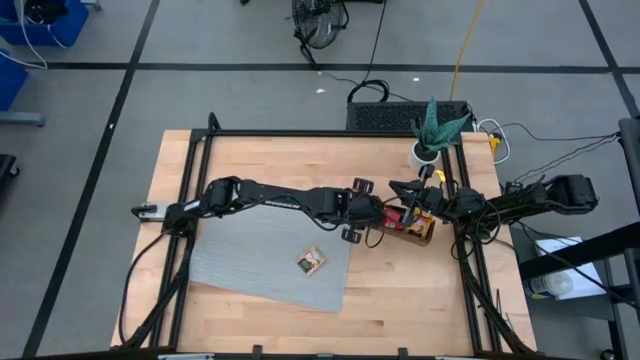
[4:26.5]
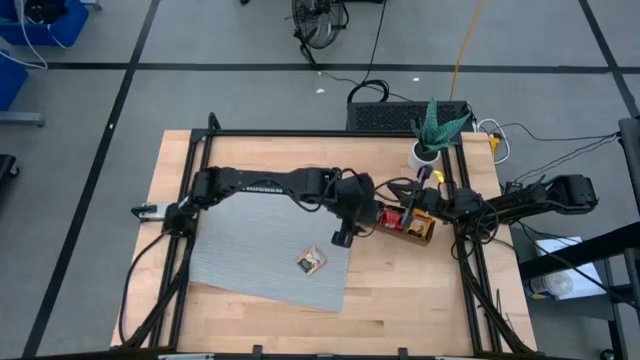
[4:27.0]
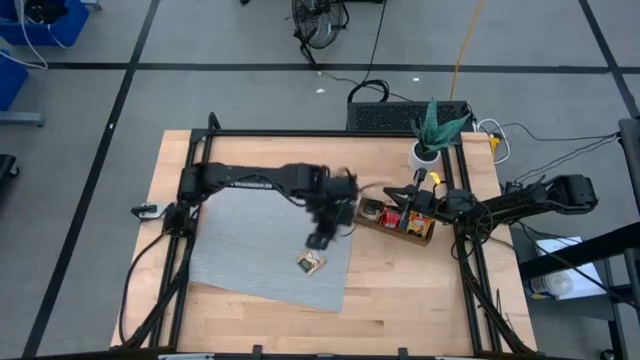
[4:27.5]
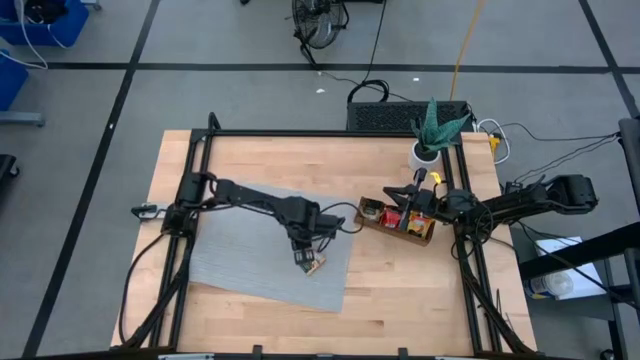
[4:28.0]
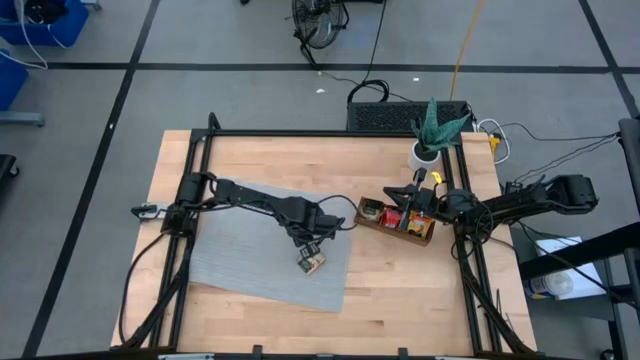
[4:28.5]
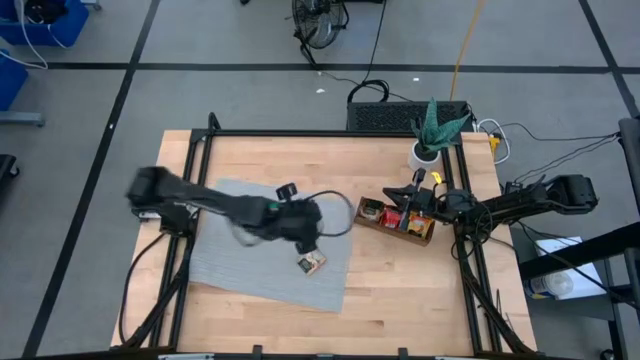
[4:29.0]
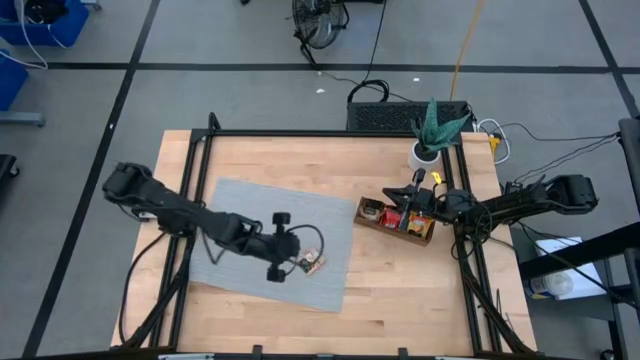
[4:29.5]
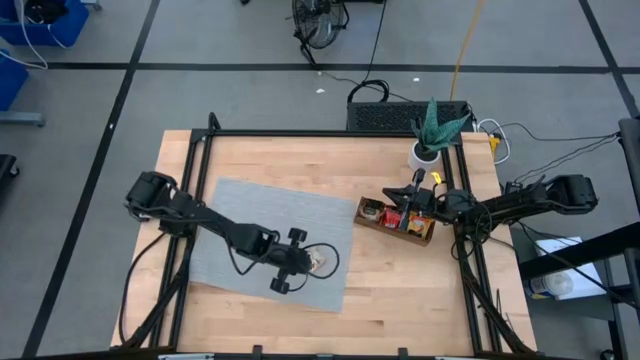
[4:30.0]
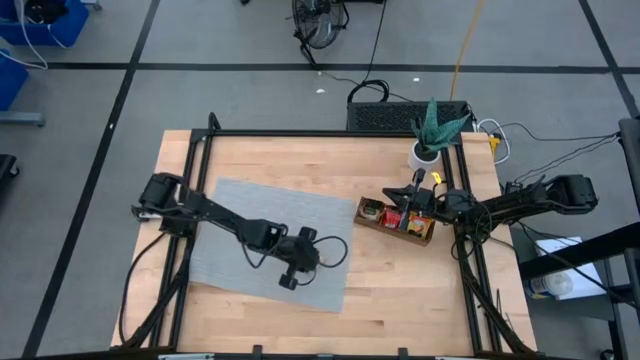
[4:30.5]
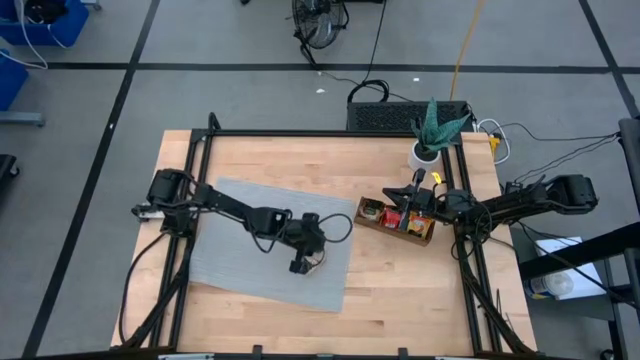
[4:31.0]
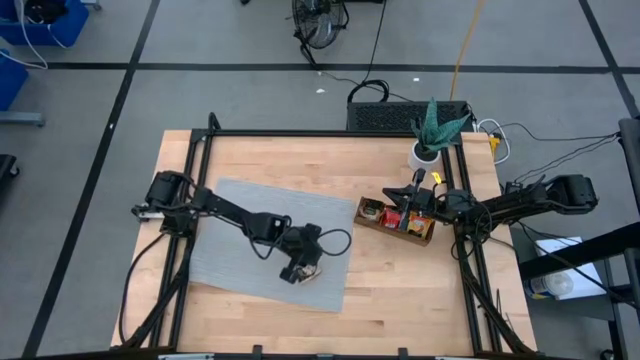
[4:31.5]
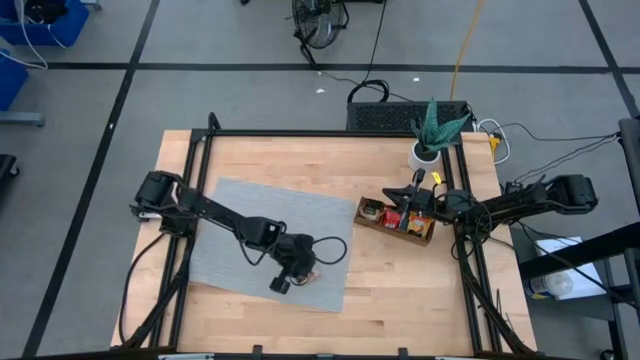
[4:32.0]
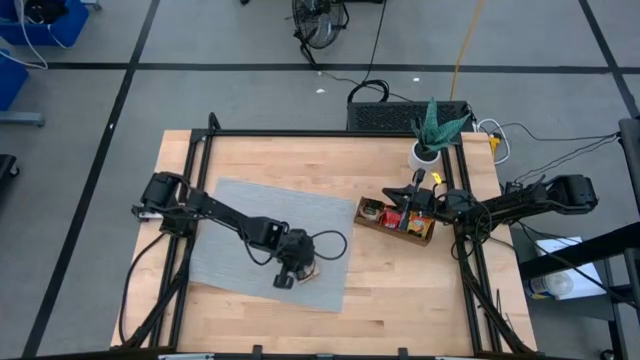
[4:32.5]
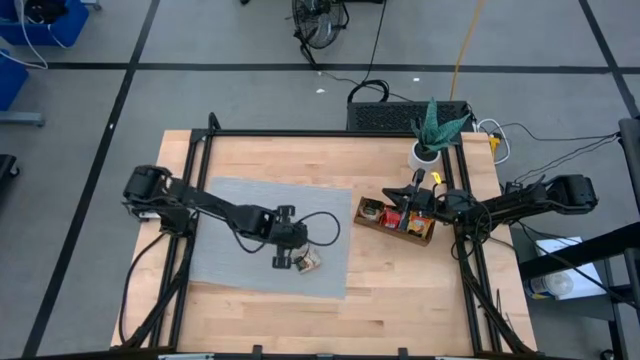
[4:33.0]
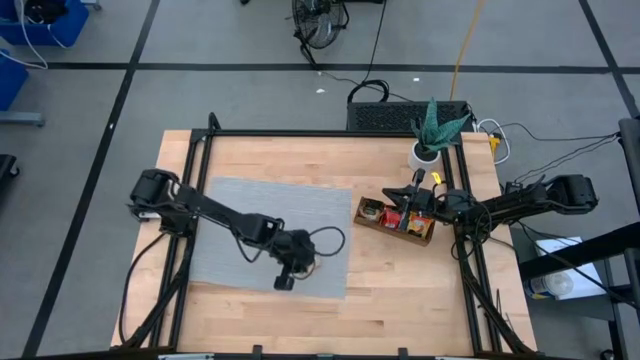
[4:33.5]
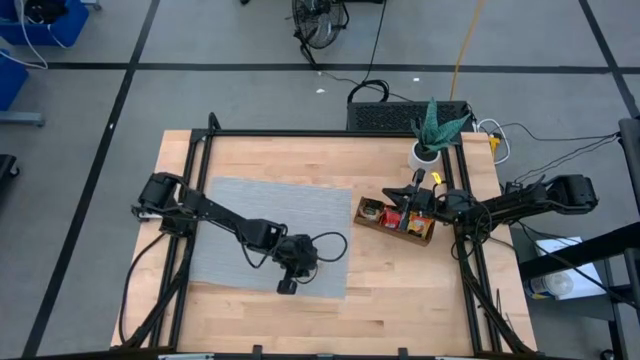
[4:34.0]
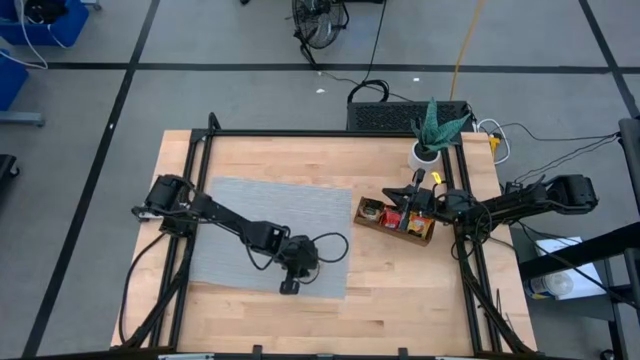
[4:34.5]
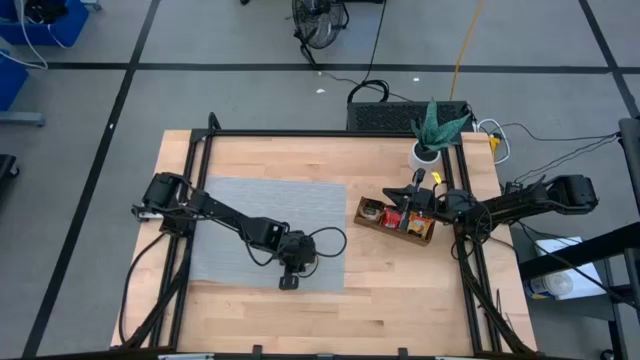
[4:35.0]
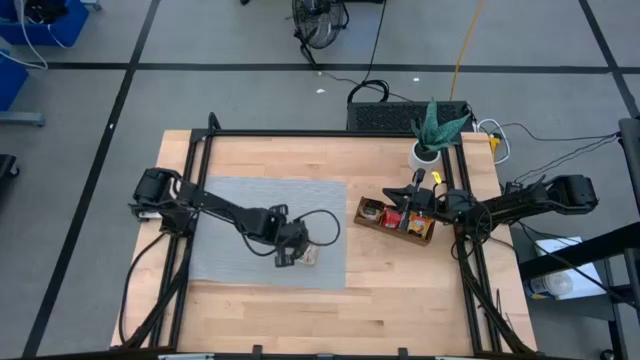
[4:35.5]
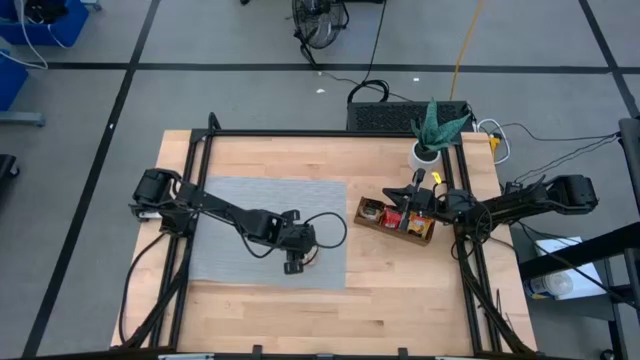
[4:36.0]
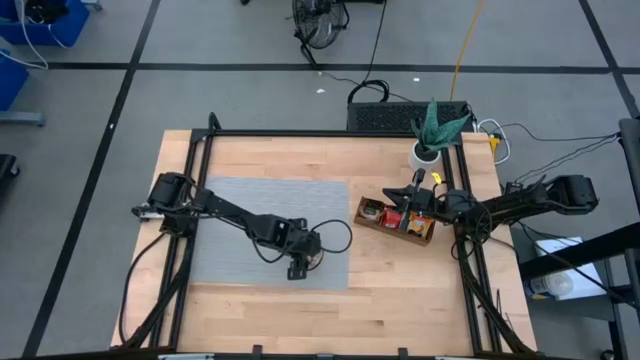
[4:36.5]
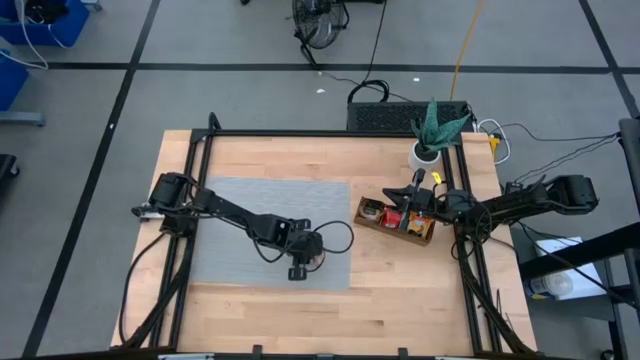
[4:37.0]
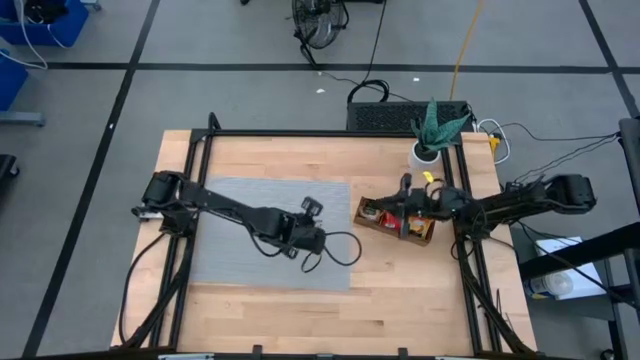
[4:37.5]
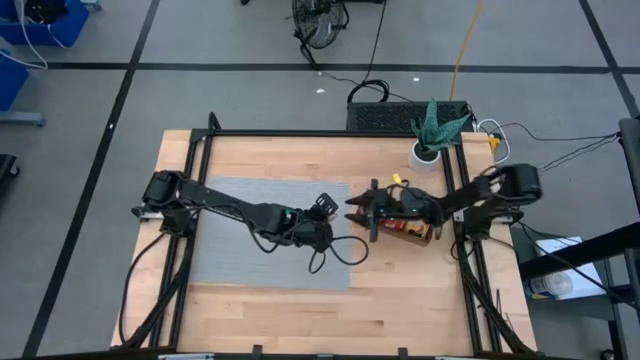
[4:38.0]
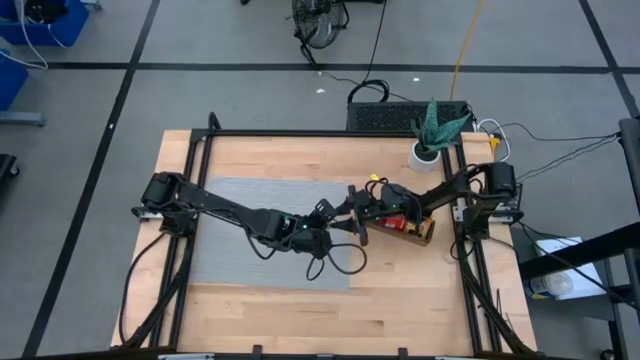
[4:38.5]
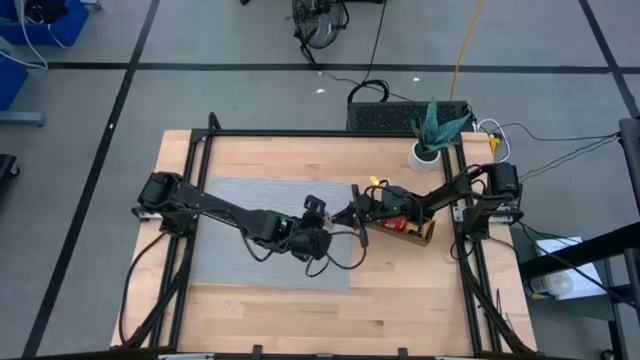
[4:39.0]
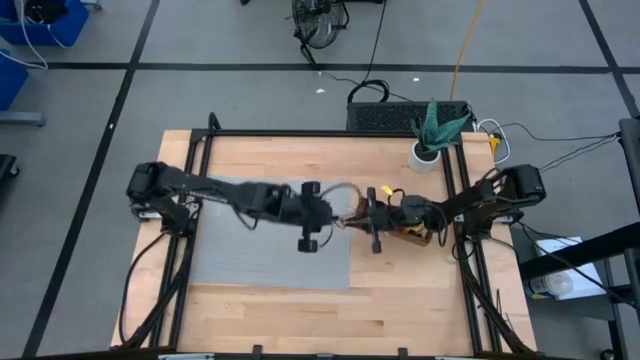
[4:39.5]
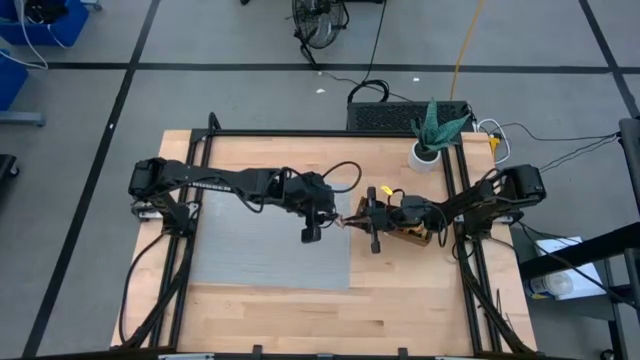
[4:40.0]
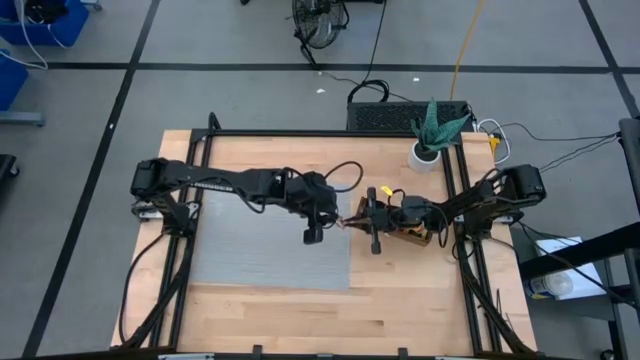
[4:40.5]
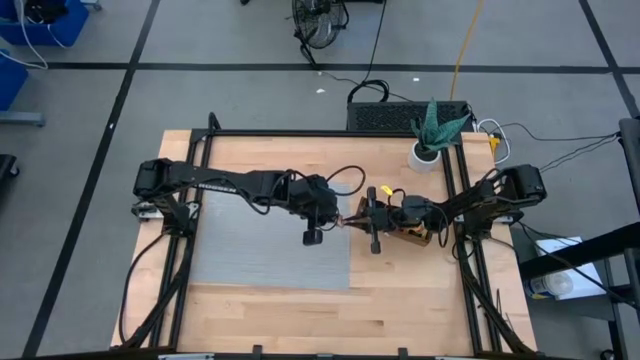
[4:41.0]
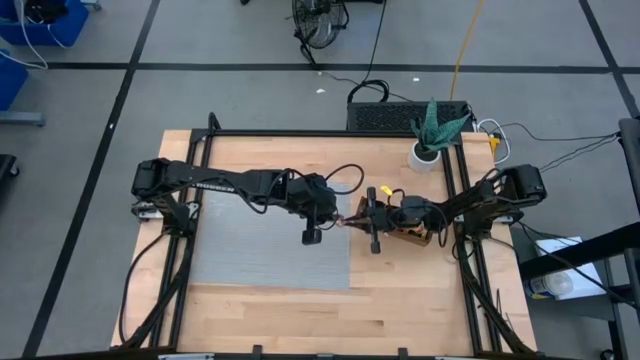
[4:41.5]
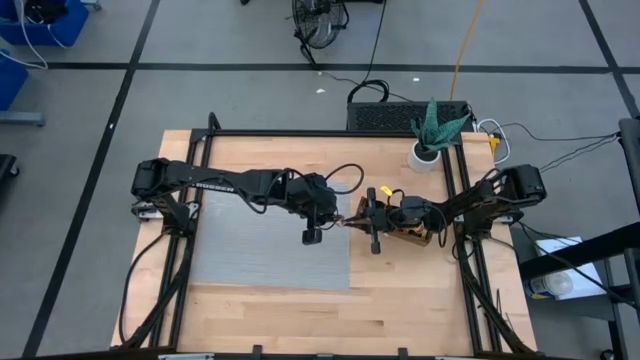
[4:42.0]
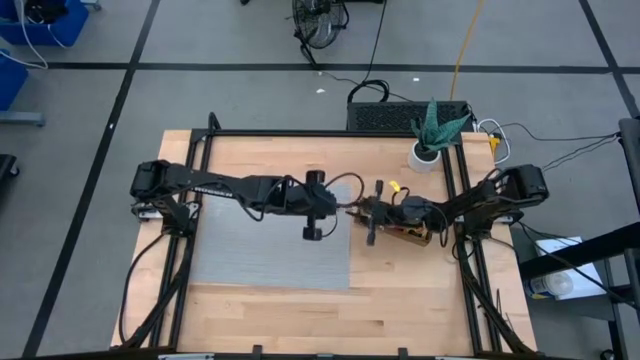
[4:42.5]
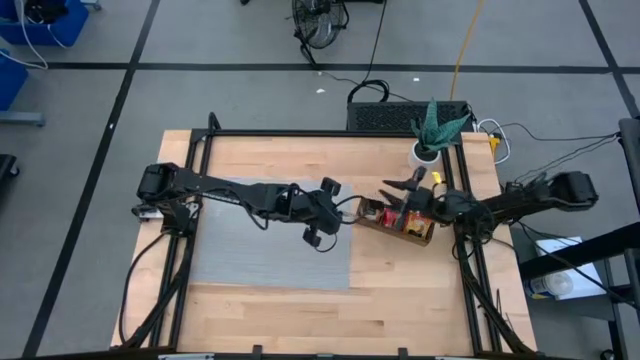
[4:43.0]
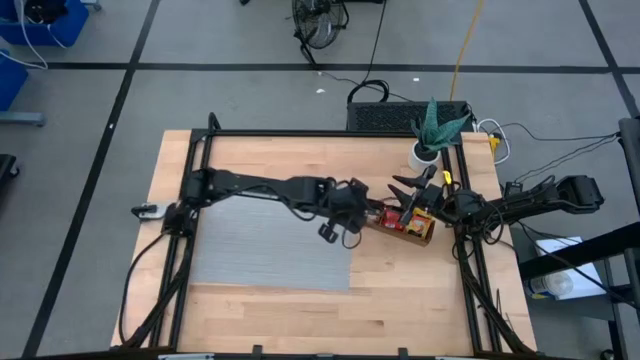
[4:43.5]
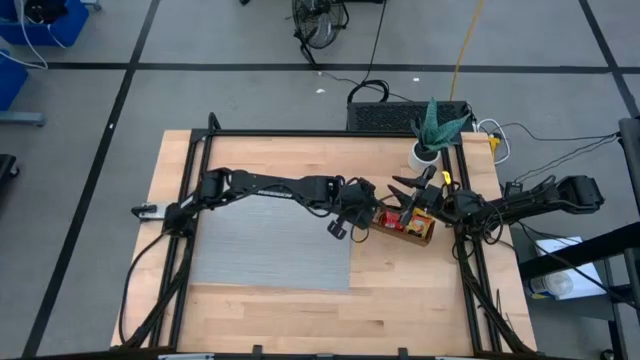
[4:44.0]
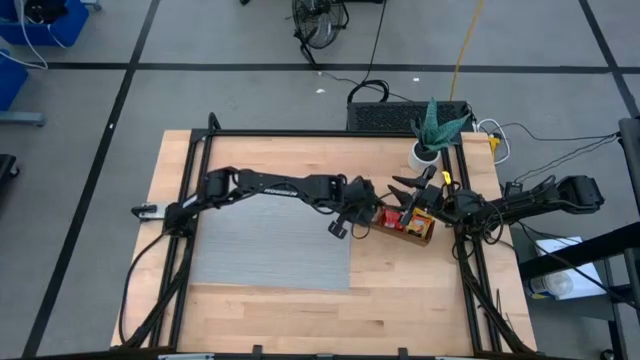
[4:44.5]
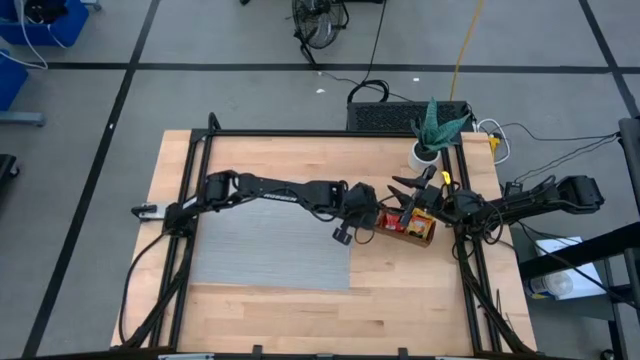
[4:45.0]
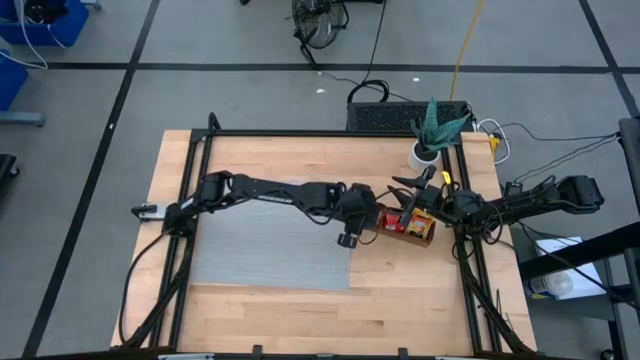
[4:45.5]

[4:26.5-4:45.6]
Task: Pick & Place Tea
Put the brown tea bag into the left section of the wooden organizer

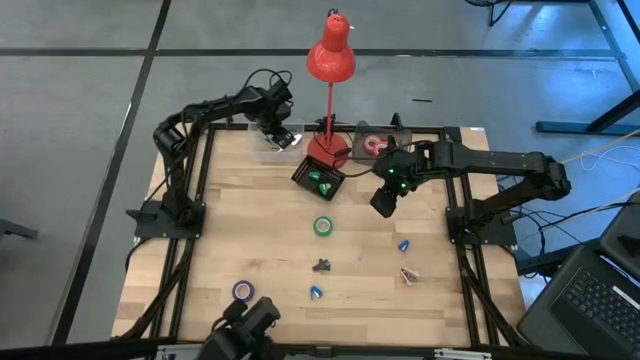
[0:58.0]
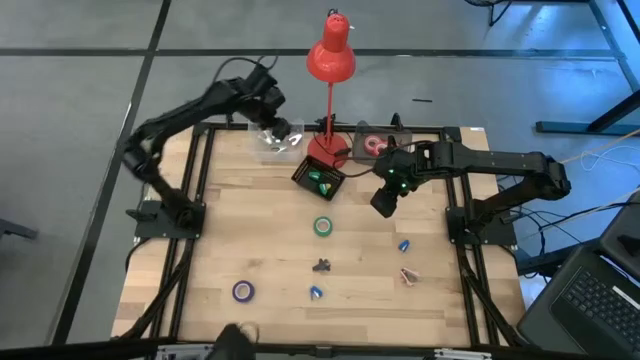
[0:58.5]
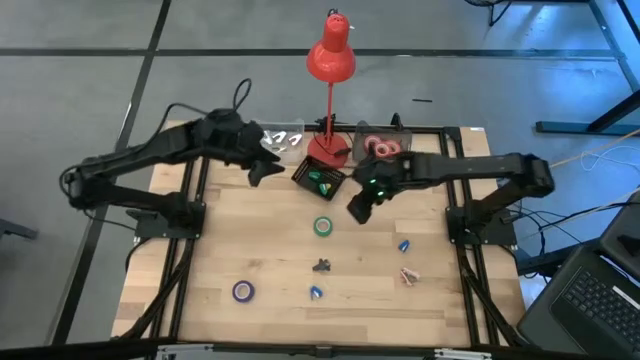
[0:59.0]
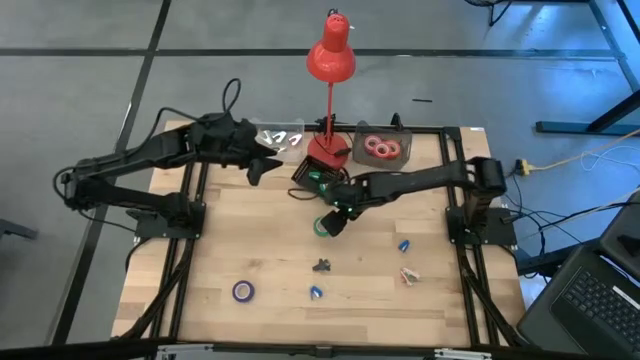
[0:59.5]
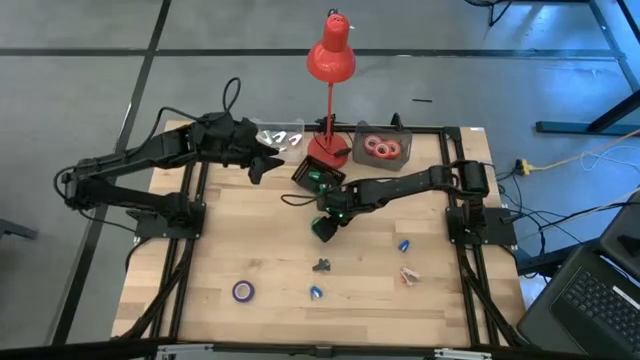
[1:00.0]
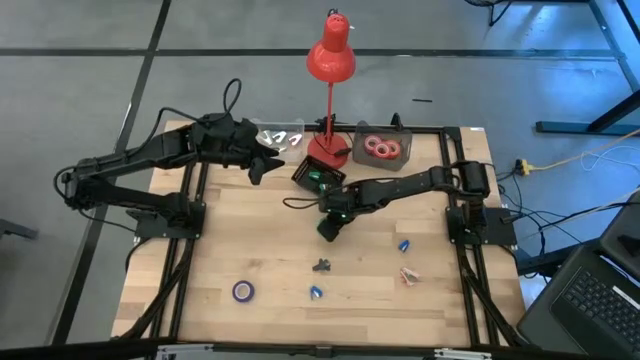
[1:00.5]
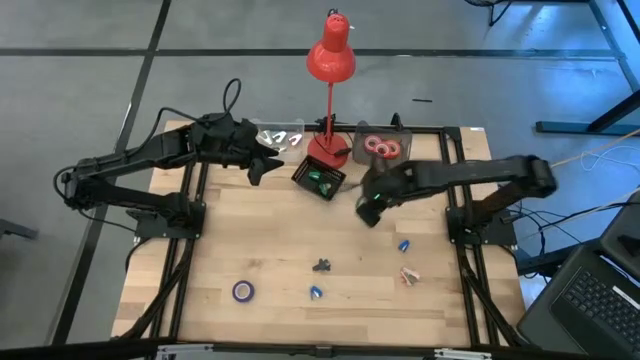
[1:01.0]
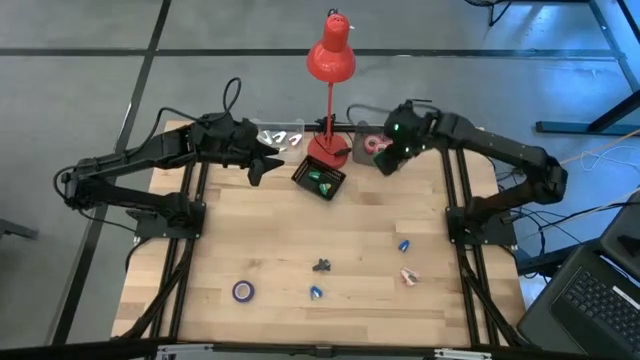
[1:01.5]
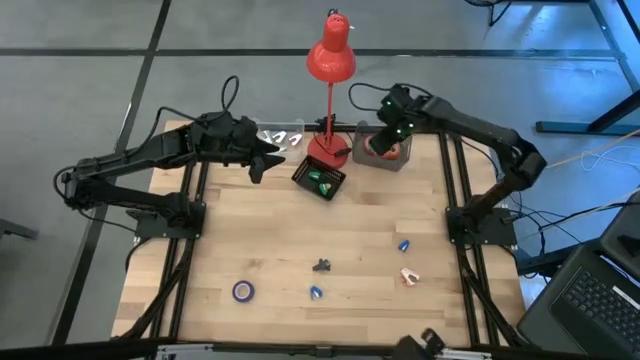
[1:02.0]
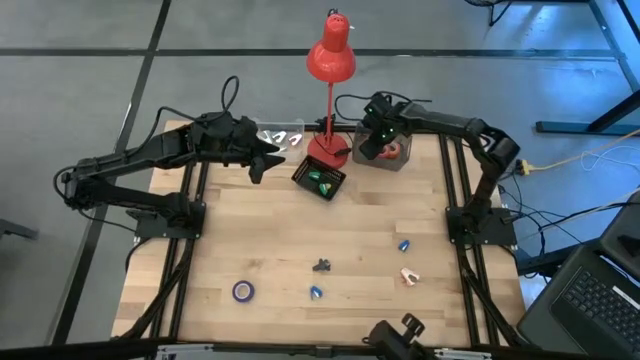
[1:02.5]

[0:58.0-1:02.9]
Task: Pick and place Stapler, Stapler remover, tape
Put the green tape into the gray bin
